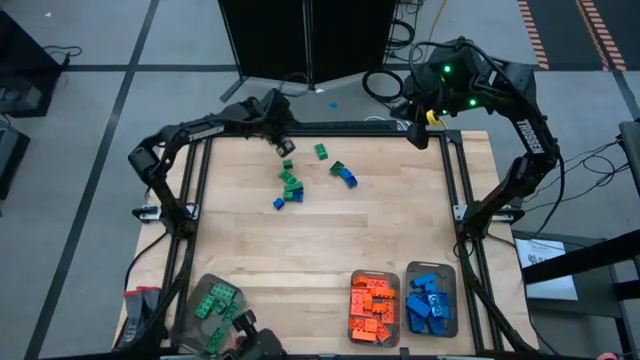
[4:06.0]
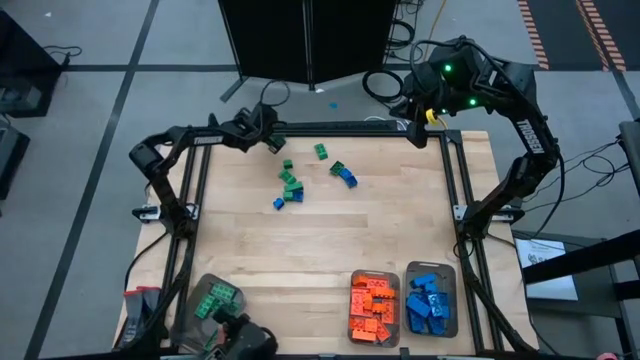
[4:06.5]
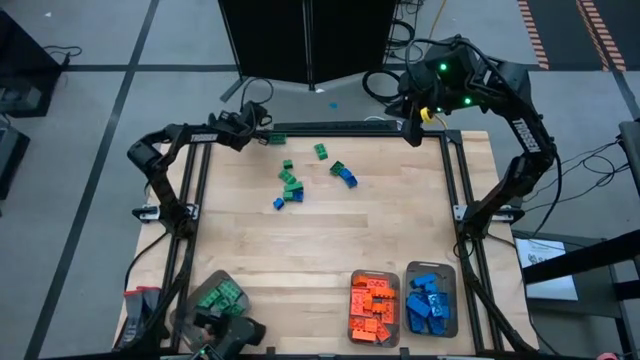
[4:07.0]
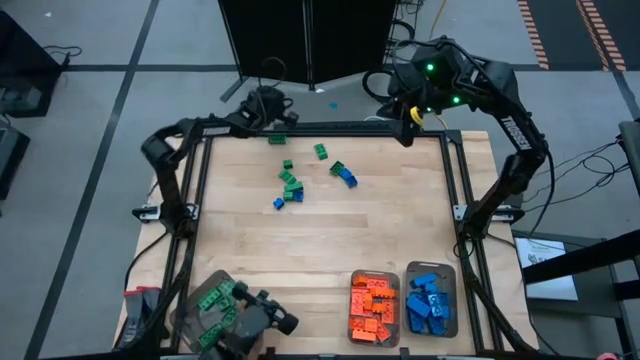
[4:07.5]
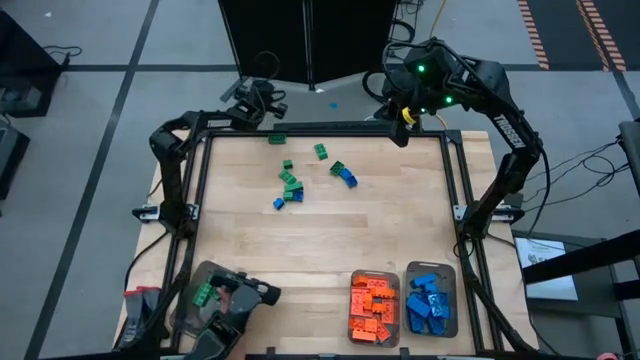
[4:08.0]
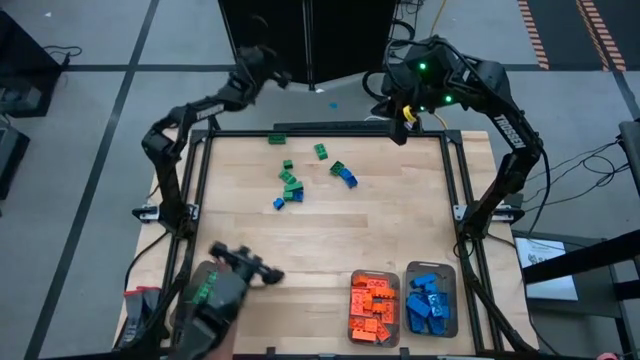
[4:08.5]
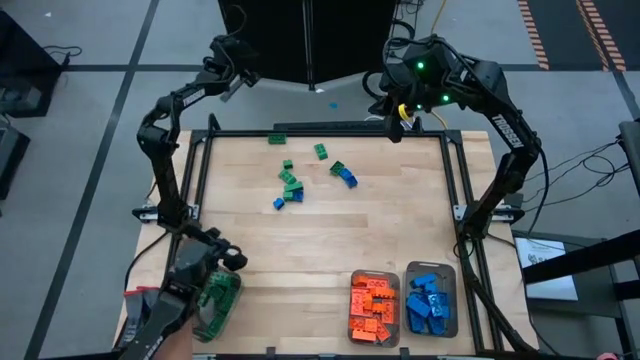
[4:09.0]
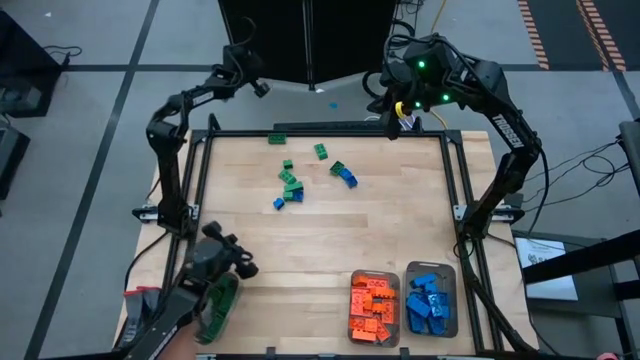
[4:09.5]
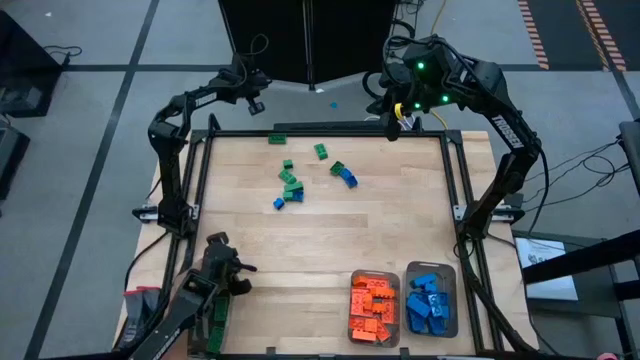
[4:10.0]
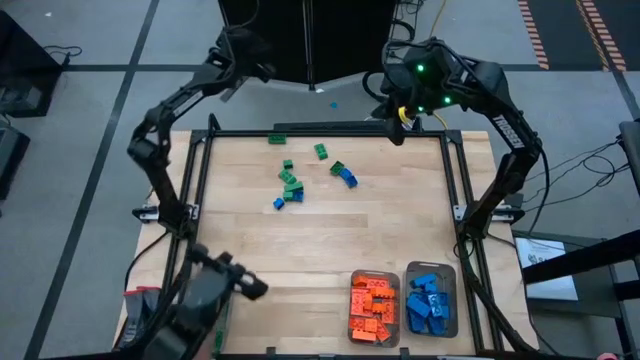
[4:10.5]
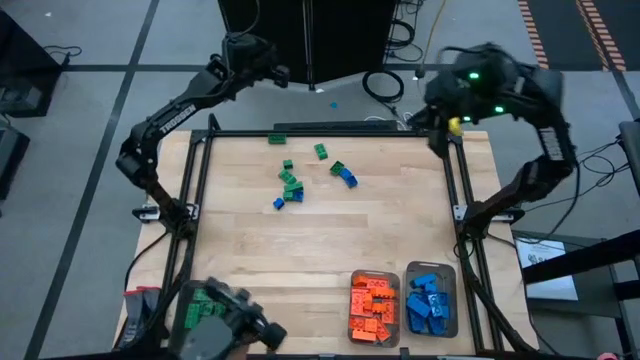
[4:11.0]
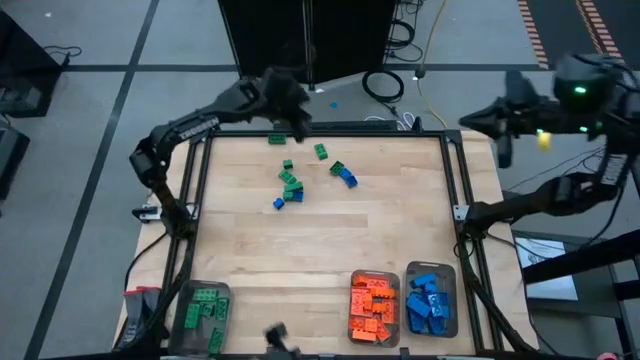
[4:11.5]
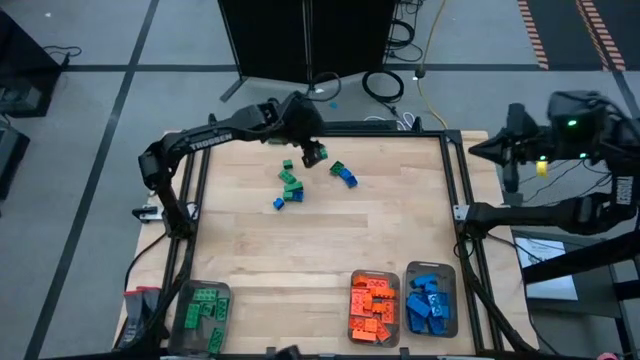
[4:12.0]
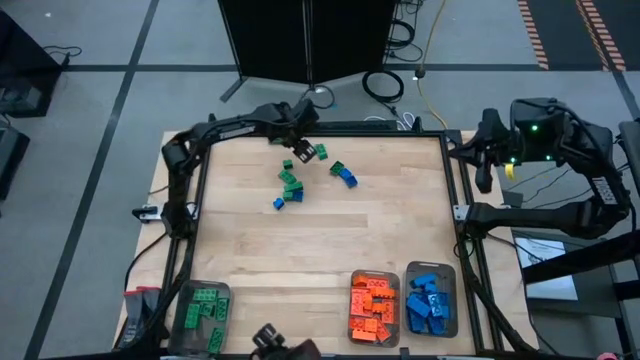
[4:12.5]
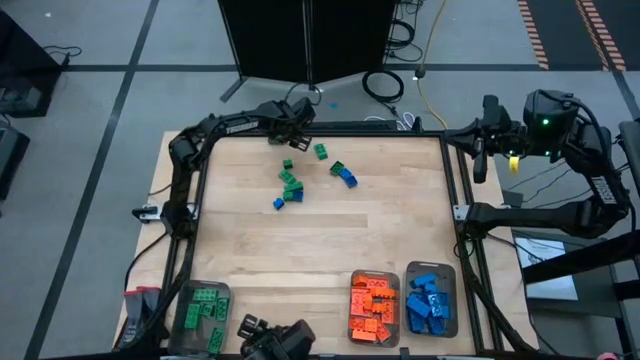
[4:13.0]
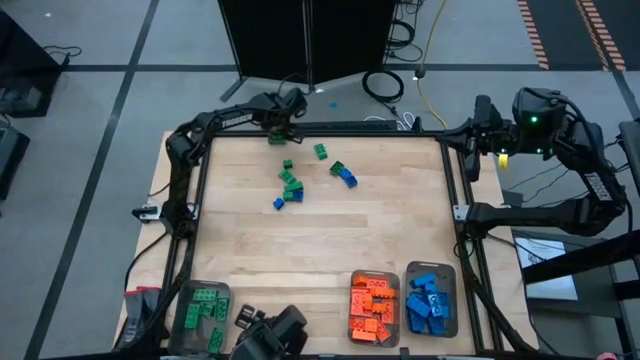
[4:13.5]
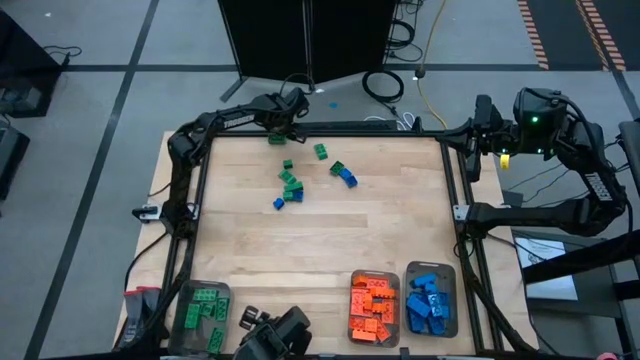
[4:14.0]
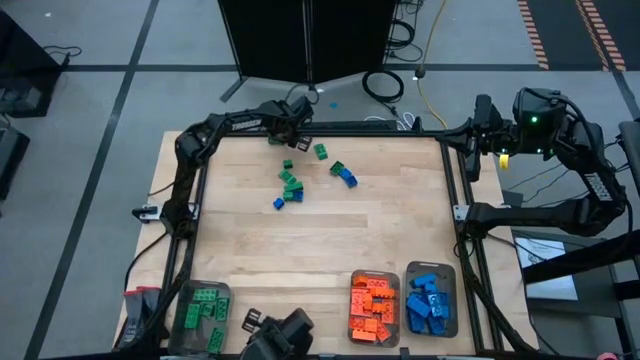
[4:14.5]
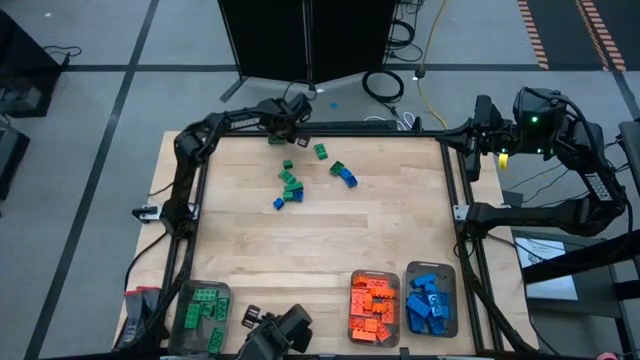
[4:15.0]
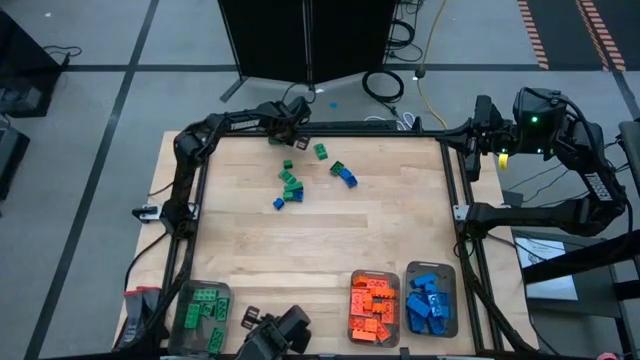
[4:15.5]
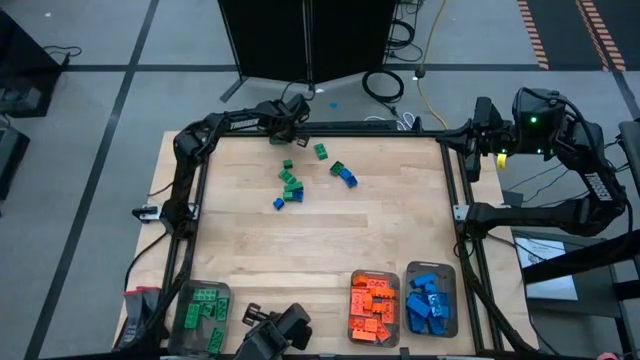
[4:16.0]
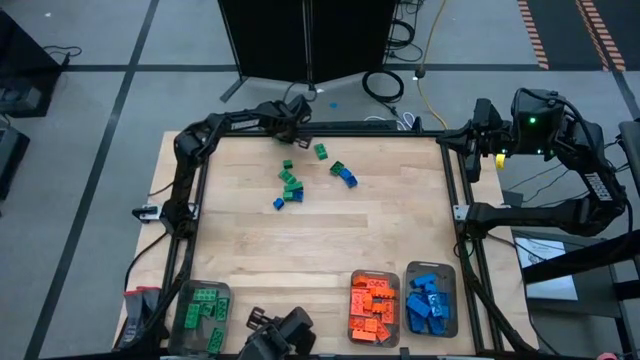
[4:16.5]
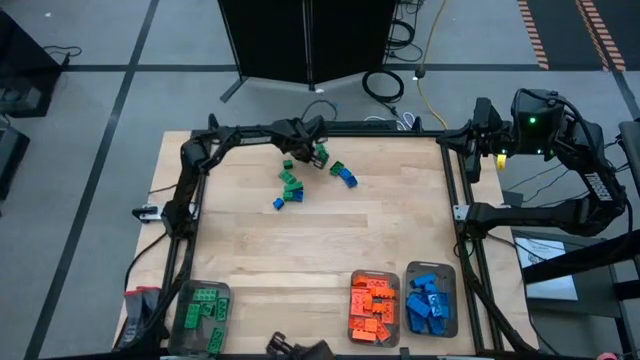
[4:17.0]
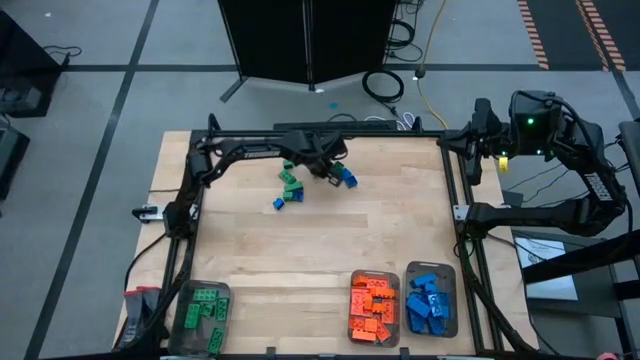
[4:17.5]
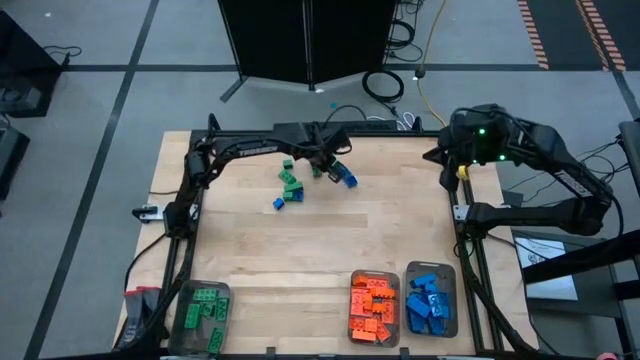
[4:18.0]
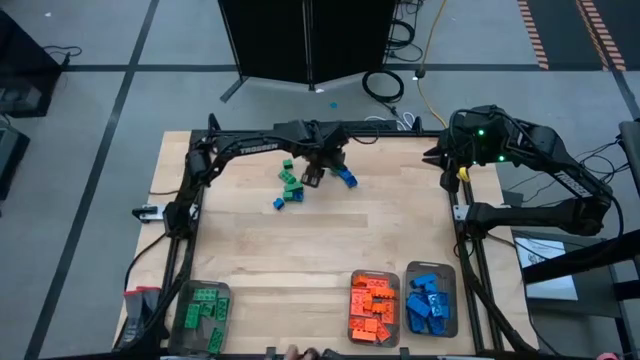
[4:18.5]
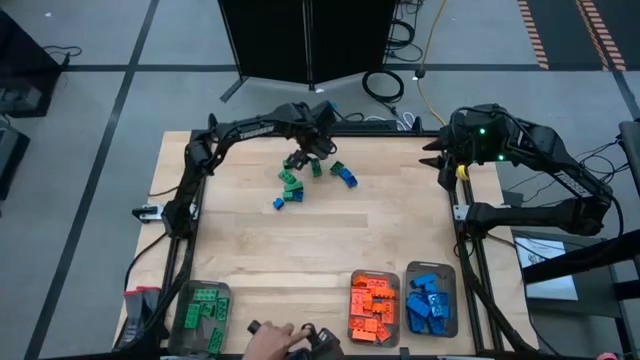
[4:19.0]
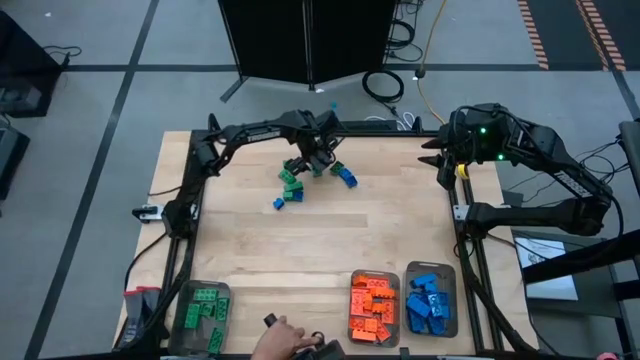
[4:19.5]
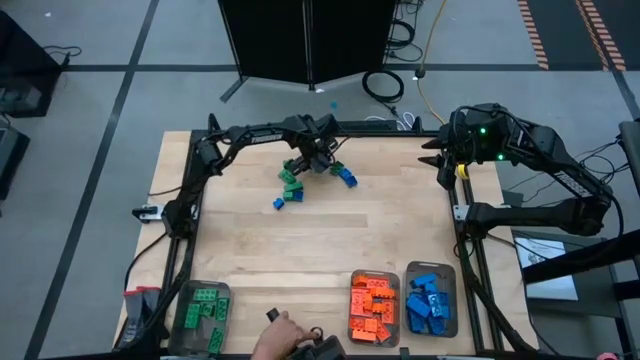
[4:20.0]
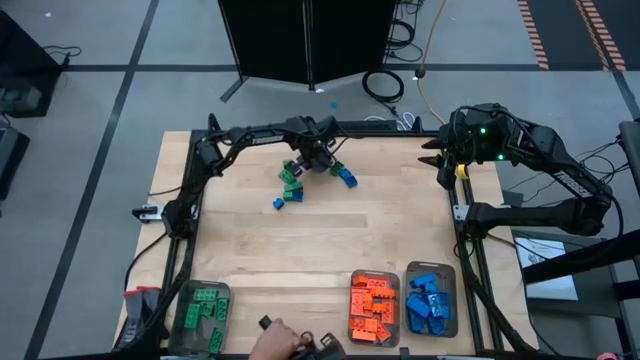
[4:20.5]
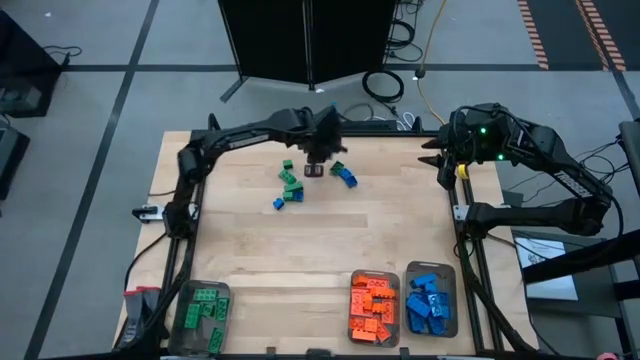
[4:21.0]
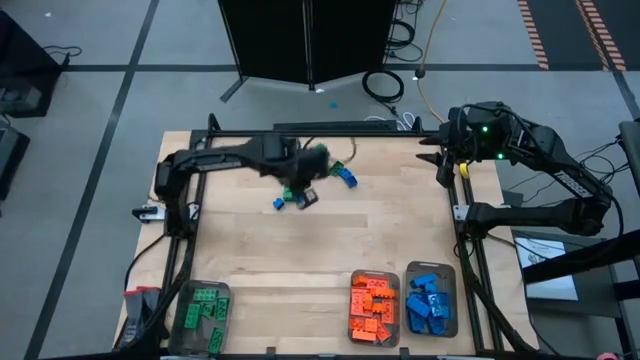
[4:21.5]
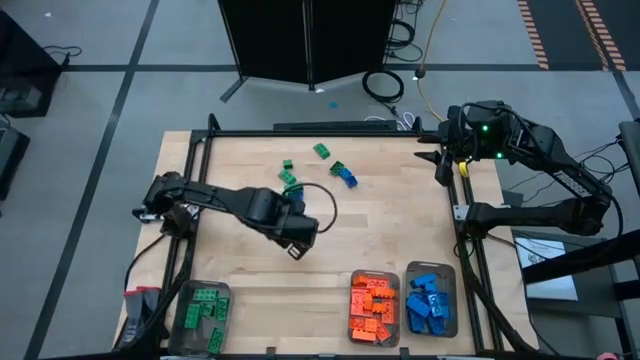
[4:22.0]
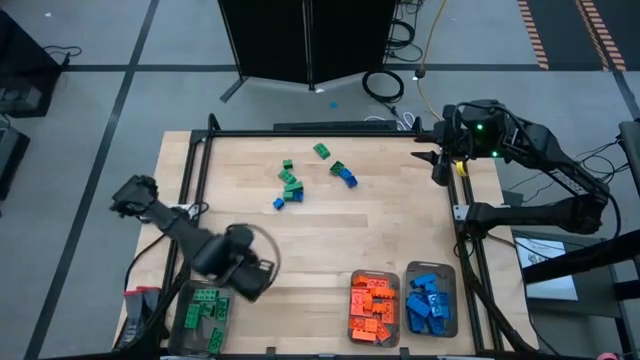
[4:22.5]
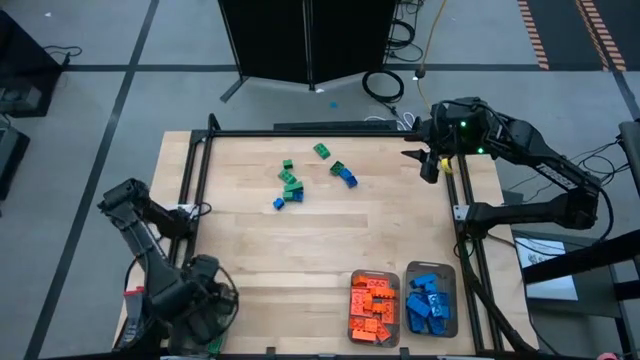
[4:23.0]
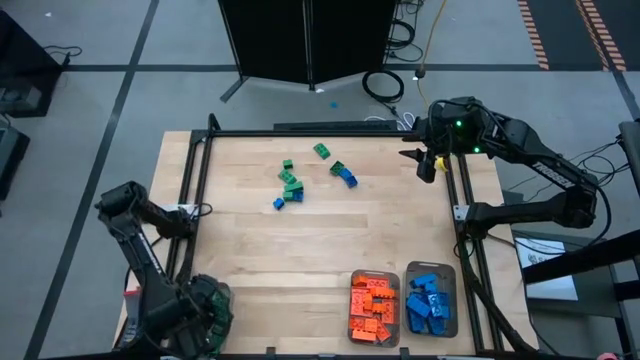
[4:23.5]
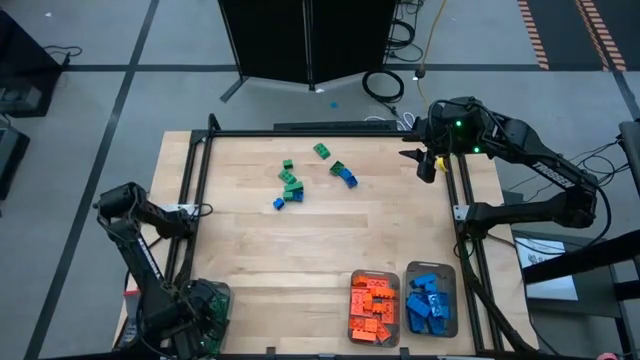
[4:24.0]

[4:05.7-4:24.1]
Task: Sort blocks
Put the green game piece into the left black bin
